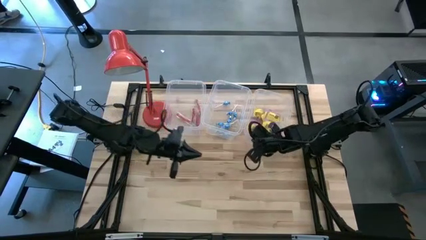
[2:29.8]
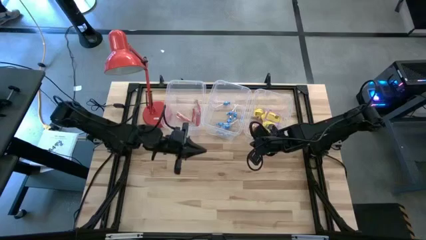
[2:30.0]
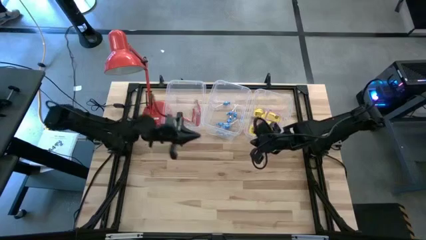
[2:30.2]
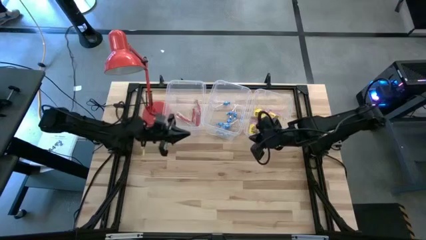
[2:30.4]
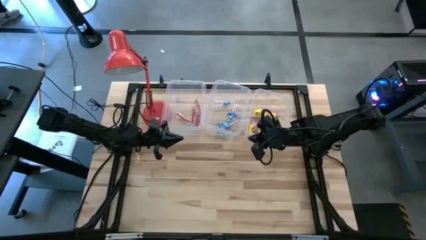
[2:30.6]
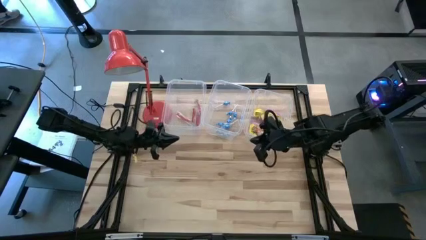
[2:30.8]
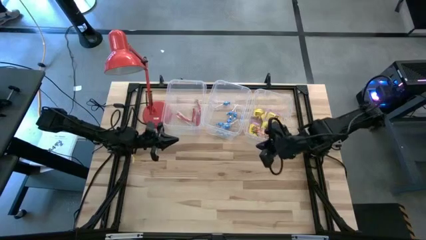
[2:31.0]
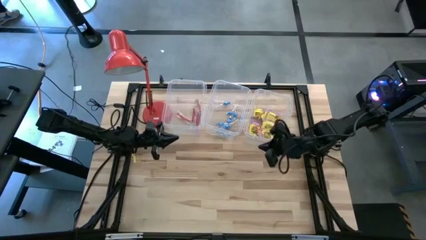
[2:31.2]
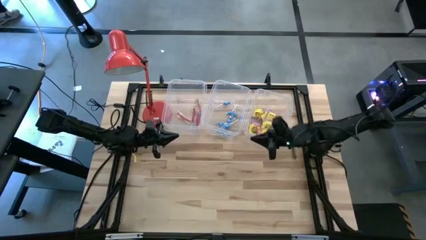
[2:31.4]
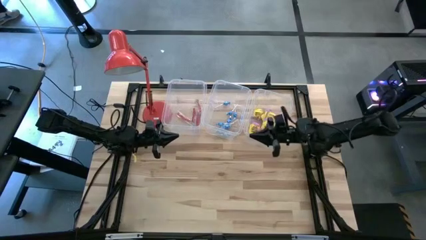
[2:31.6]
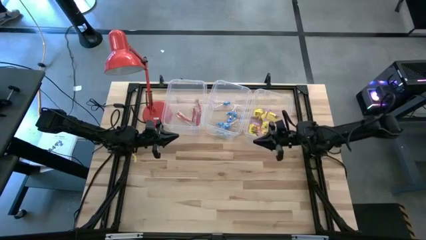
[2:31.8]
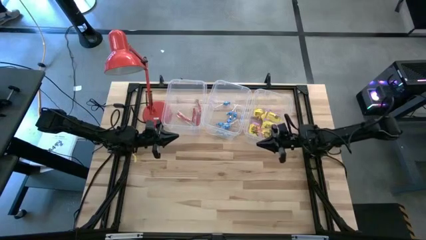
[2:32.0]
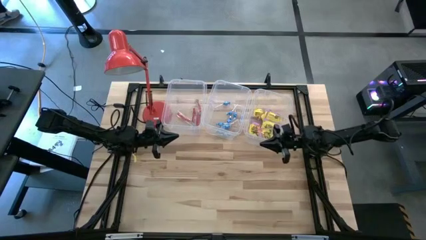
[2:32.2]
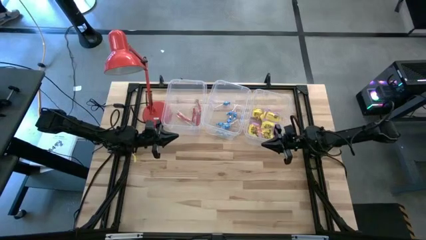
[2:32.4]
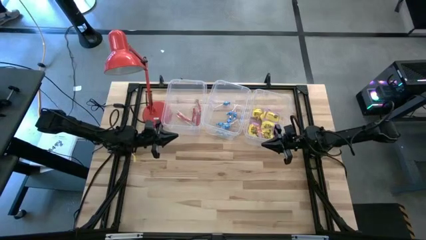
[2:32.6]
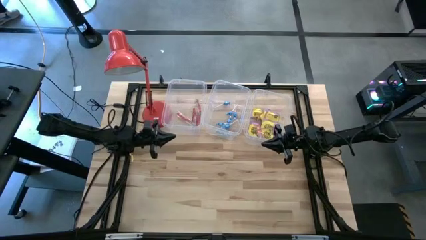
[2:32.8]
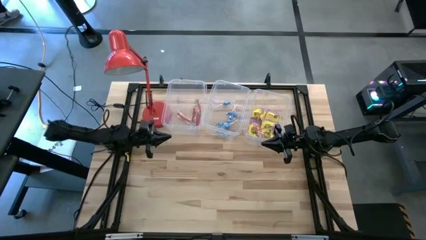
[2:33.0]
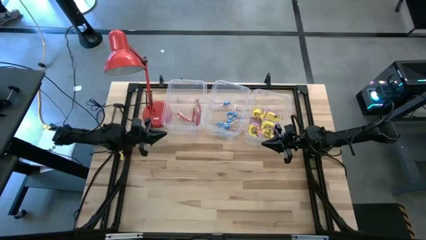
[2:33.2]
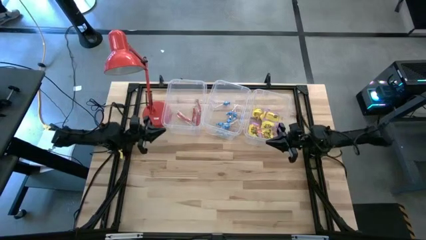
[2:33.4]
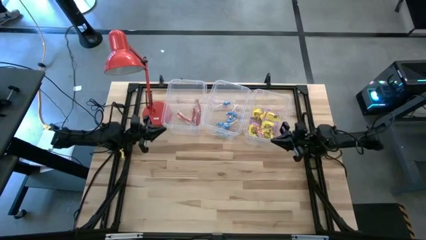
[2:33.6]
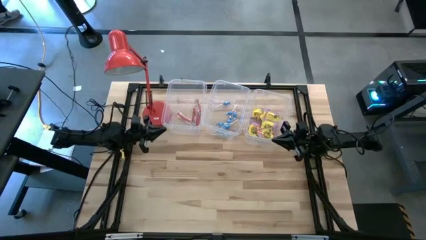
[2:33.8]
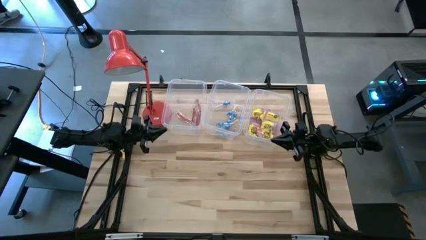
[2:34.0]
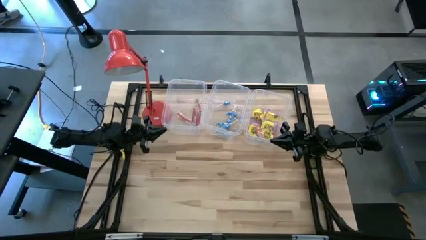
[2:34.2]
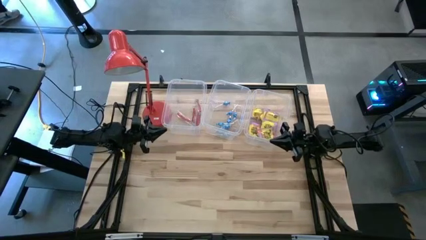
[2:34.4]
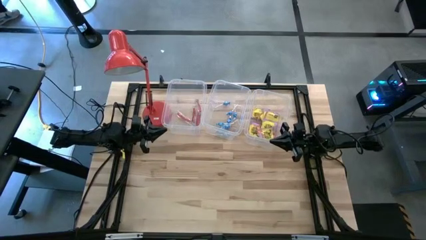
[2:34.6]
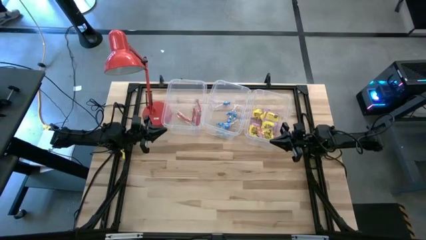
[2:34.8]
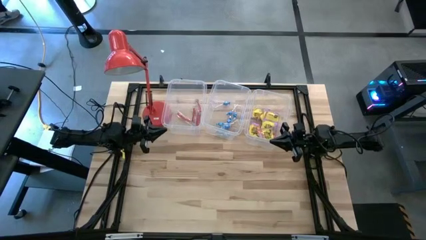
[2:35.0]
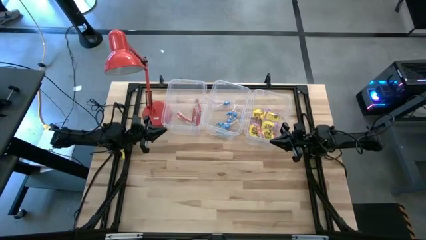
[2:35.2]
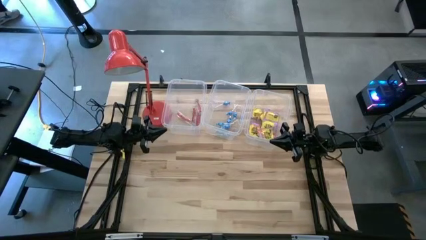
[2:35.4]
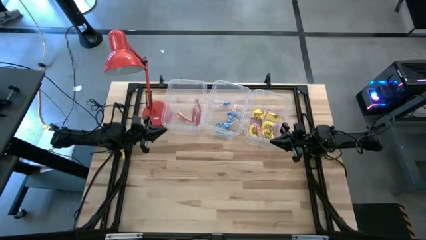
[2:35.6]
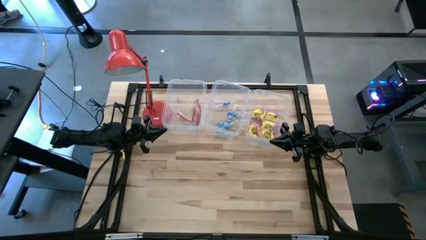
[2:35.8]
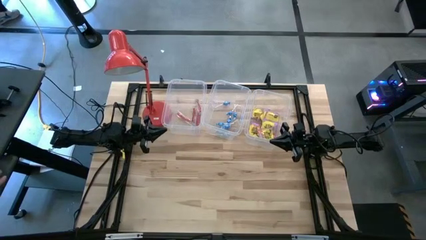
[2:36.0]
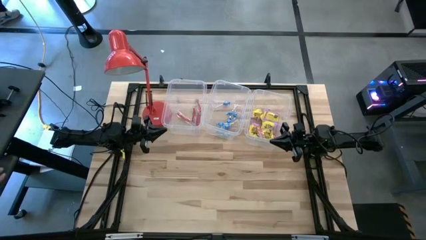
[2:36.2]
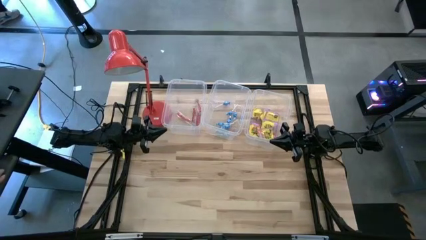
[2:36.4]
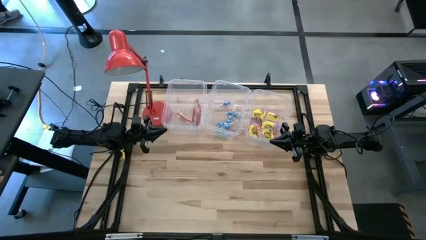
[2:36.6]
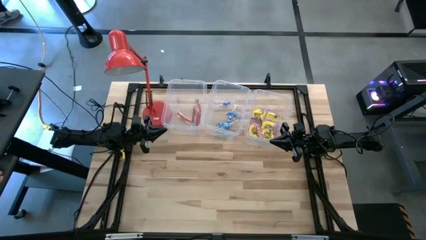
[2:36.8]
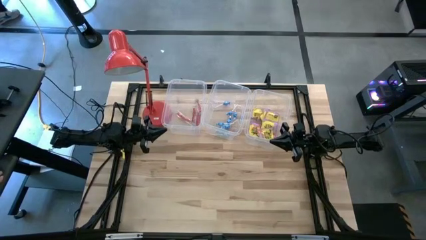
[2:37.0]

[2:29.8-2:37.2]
Task: Sort candy
Return to Home Position

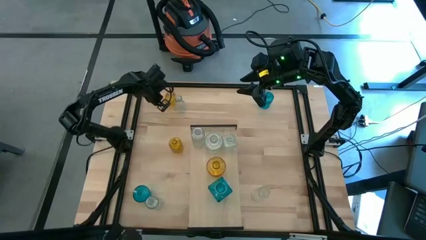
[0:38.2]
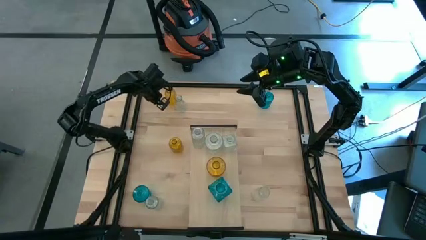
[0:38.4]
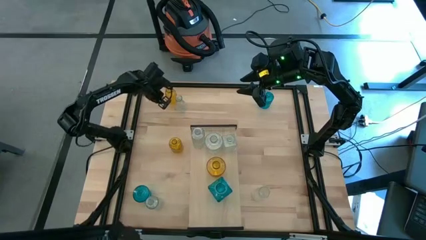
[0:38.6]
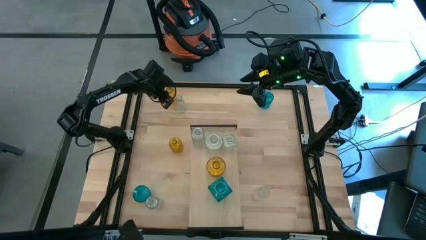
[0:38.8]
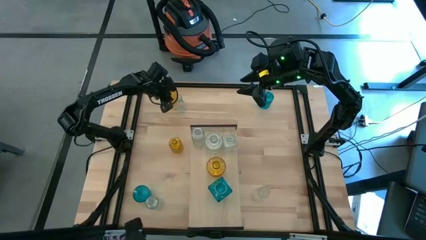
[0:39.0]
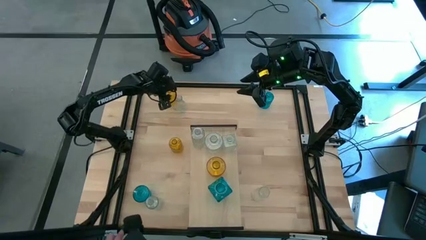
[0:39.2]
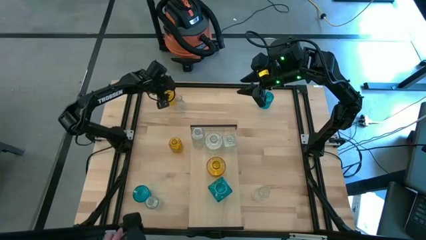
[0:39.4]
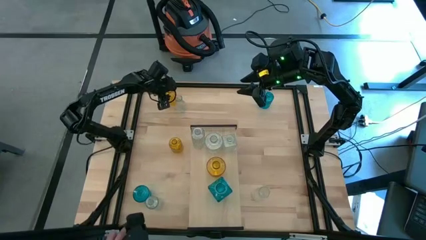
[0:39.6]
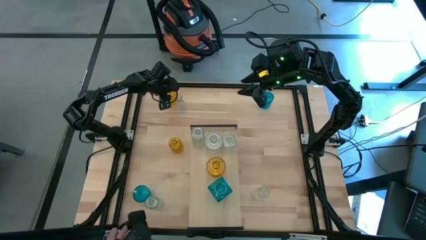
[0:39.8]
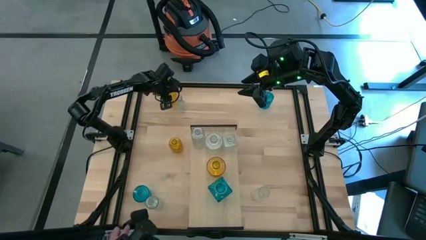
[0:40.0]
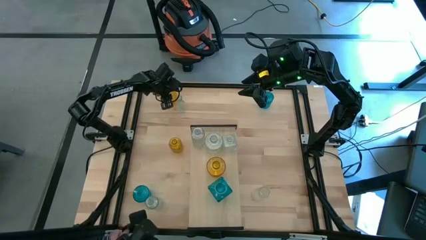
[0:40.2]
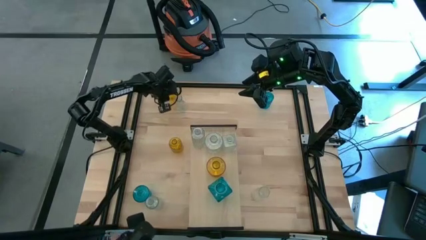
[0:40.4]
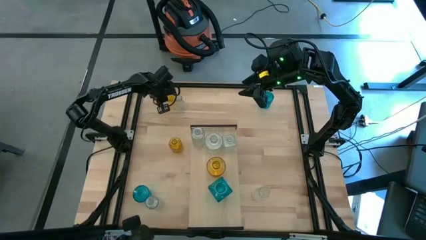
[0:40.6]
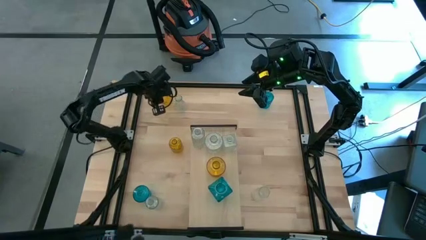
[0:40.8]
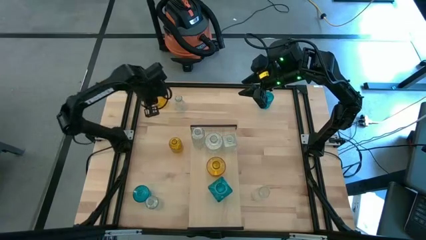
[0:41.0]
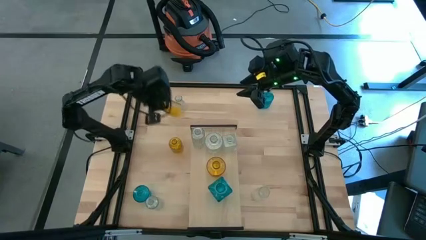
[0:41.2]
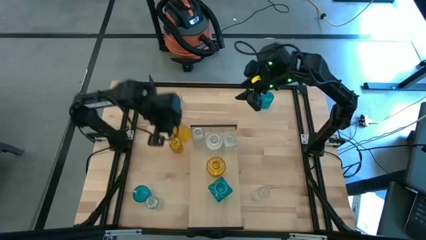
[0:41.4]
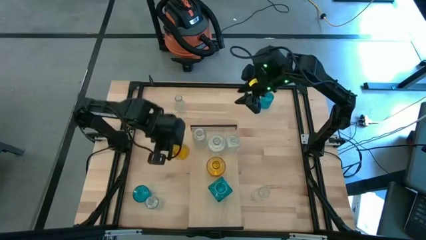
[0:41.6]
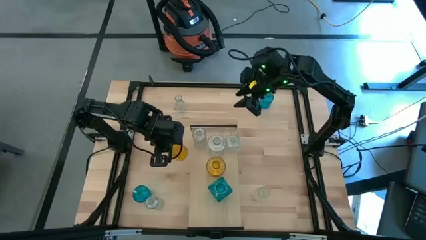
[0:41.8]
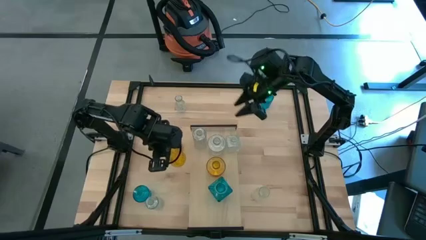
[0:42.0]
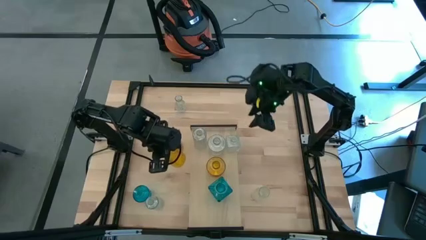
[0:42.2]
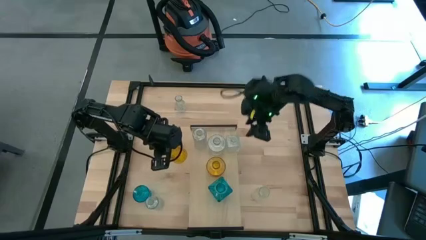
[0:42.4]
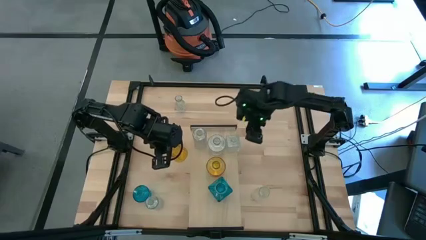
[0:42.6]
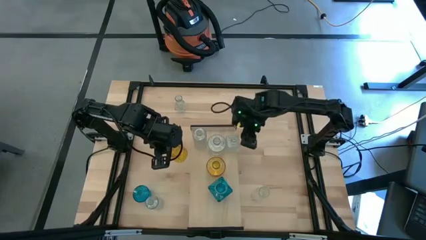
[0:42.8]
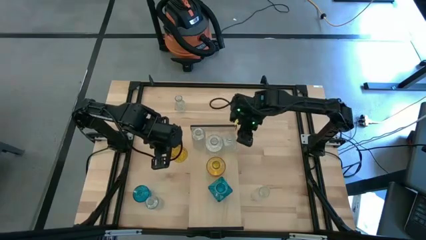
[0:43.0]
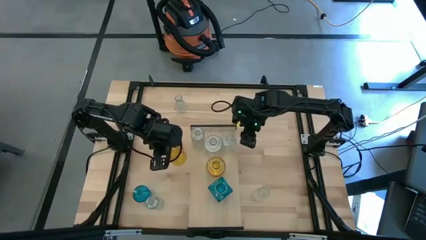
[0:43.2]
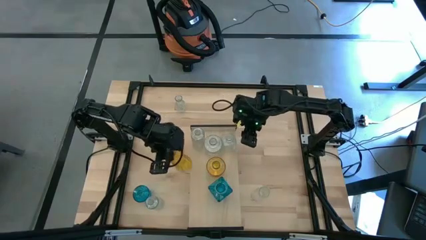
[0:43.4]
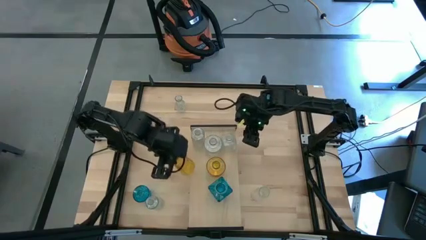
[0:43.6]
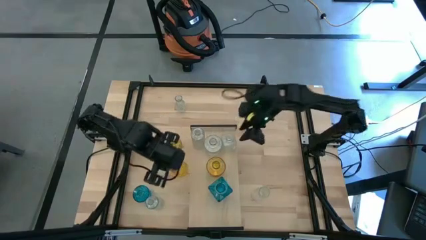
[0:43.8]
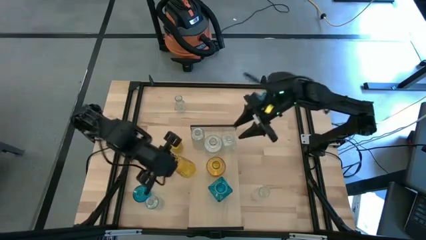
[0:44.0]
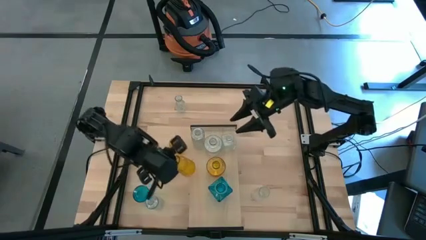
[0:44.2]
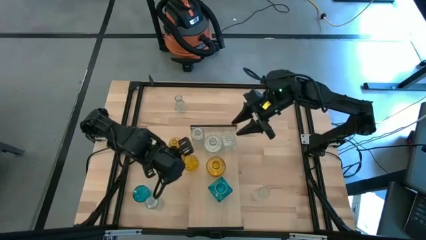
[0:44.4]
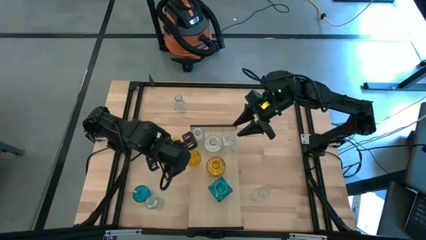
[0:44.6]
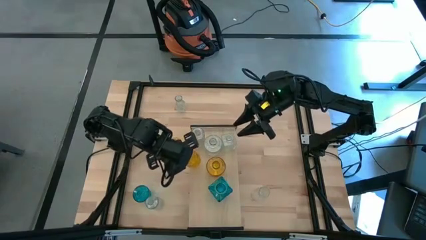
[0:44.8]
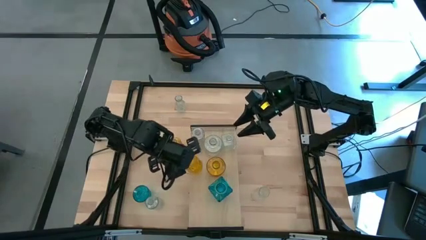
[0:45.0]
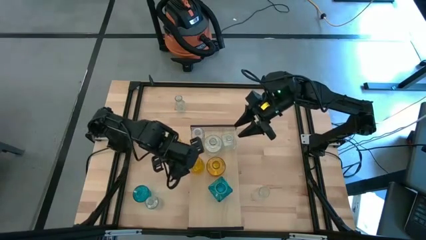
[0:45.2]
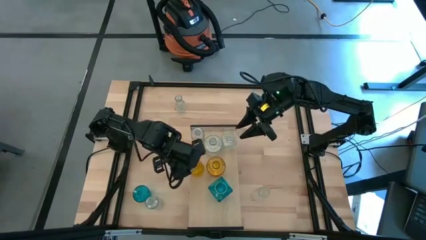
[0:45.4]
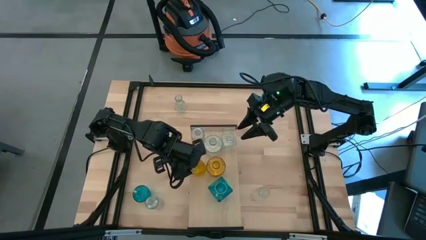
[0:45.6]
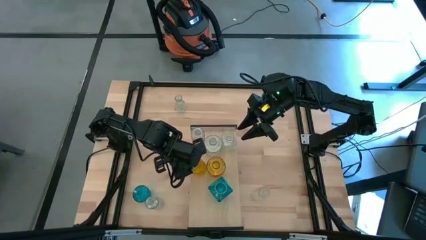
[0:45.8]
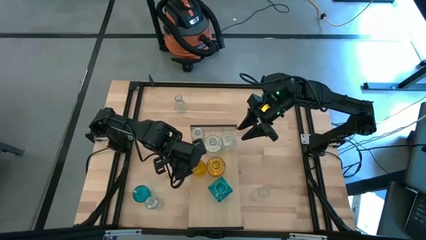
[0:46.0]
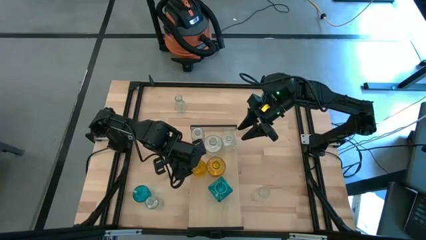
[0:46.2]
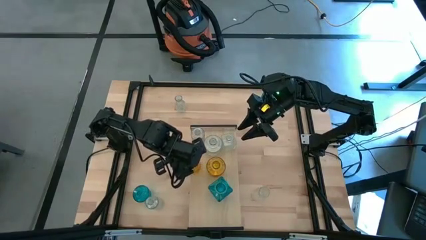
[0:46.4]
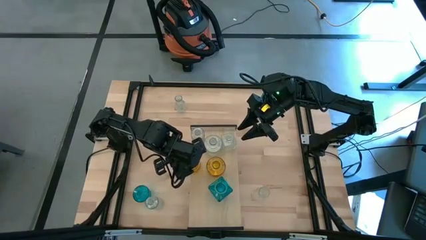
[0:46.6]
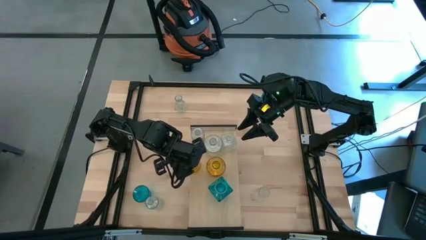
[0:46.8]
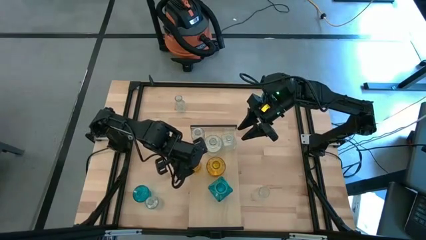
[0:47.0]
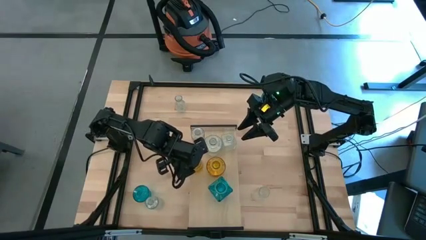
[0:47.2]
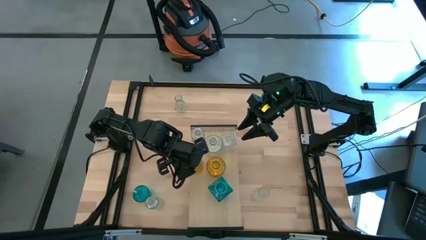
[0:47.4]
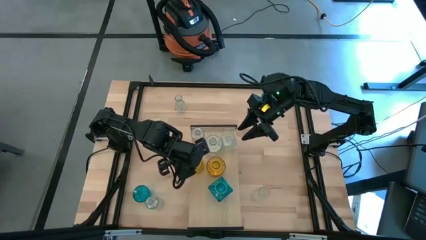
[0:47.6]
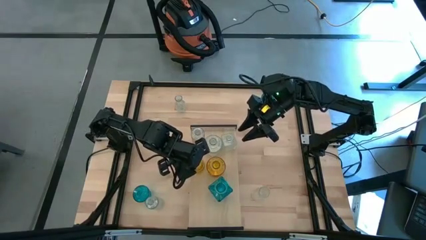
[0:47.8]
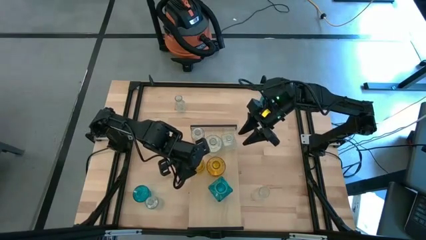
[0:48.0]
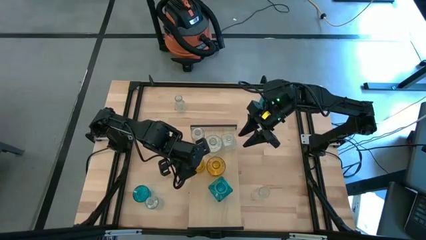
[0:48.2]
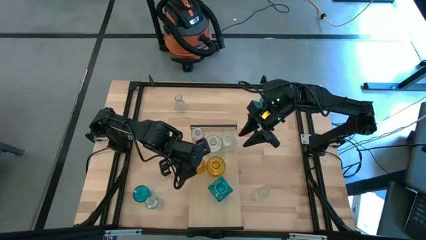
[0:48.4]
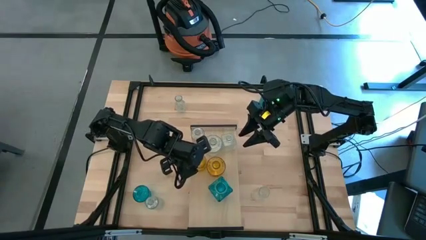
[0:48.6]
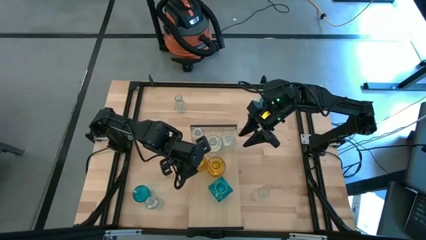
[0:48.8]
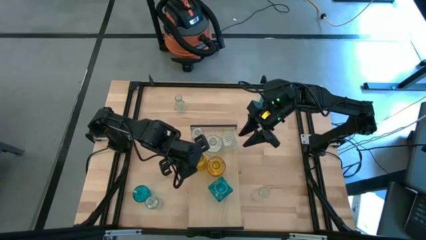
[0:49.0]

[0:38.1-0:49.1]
Task: sort vases onto shelf
Put the yellow vase on the shelf aligned with the other yellow vase
